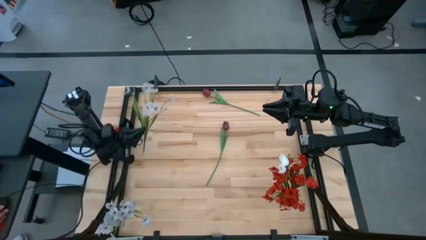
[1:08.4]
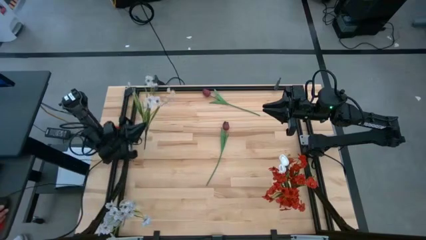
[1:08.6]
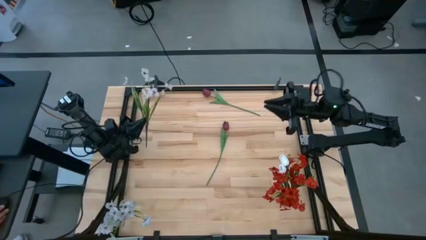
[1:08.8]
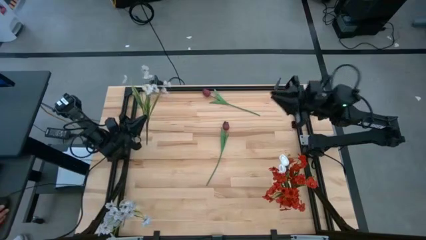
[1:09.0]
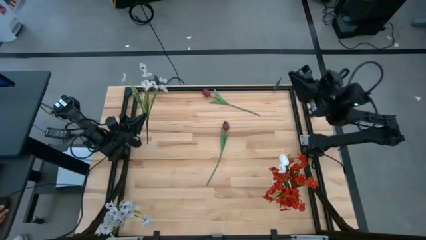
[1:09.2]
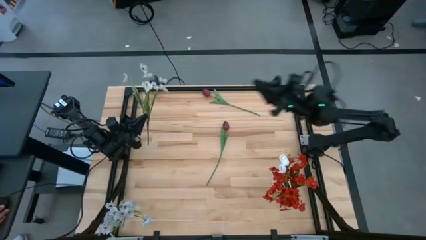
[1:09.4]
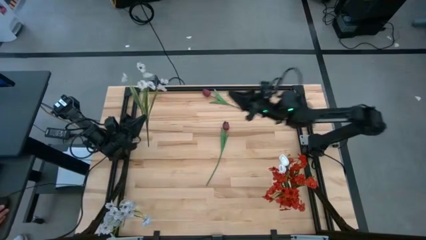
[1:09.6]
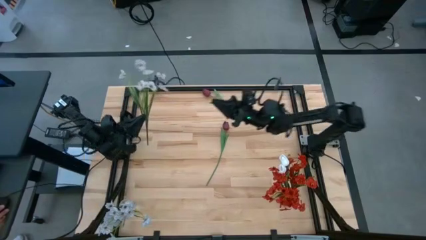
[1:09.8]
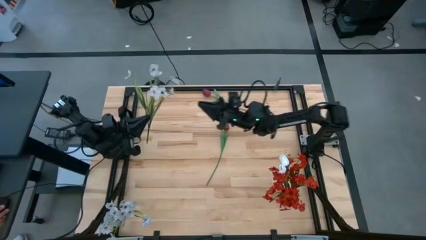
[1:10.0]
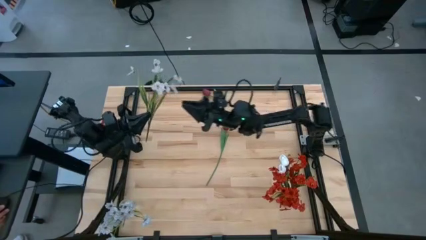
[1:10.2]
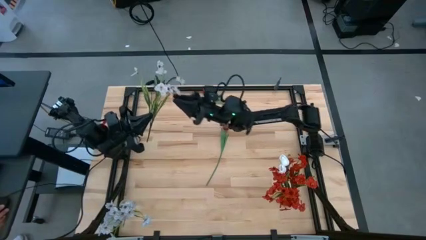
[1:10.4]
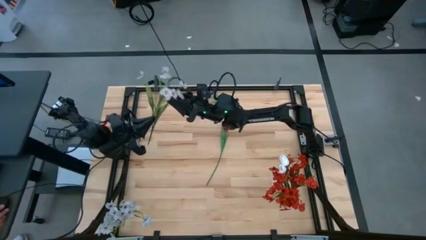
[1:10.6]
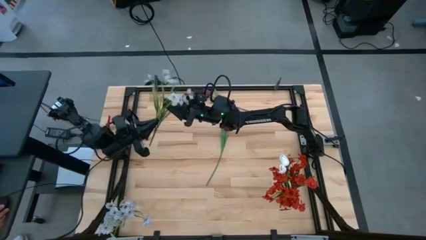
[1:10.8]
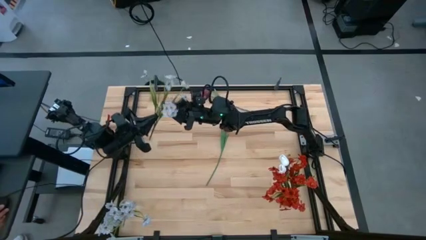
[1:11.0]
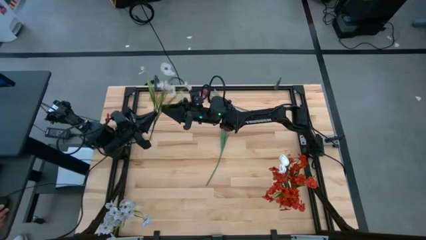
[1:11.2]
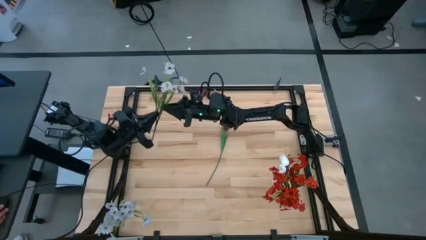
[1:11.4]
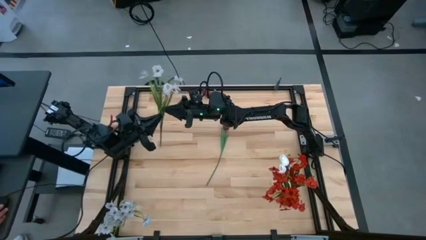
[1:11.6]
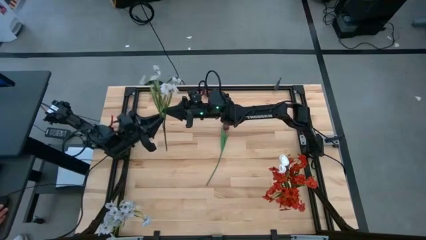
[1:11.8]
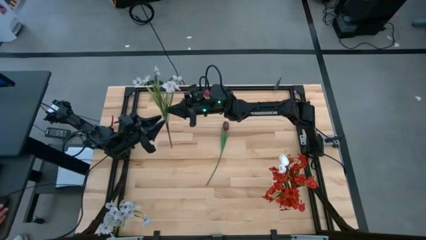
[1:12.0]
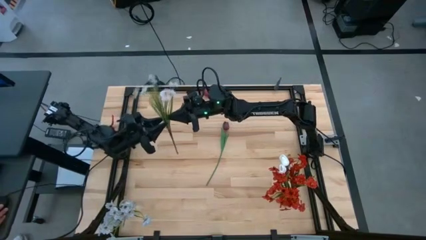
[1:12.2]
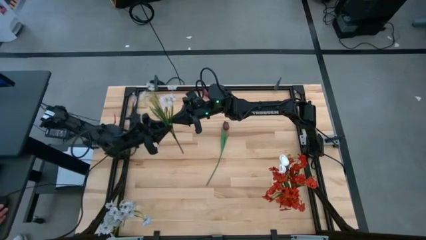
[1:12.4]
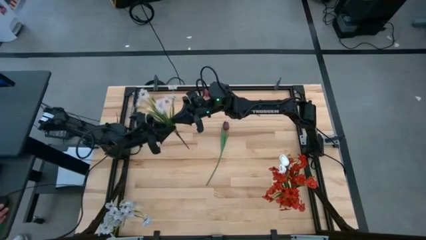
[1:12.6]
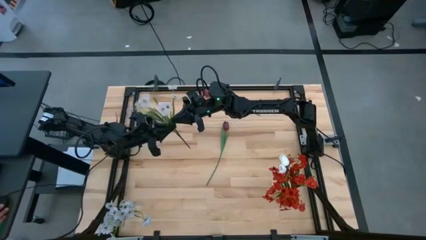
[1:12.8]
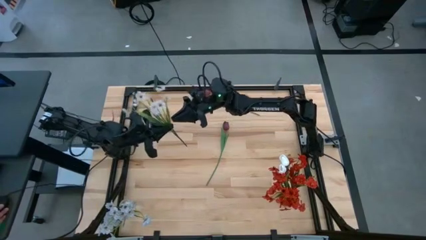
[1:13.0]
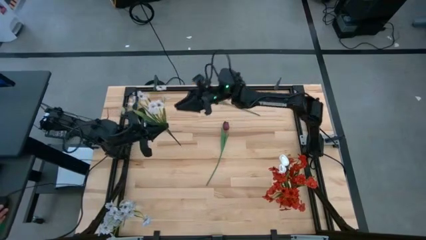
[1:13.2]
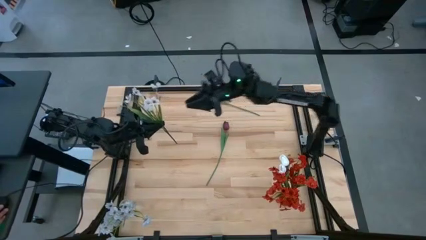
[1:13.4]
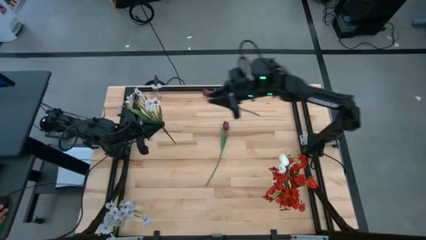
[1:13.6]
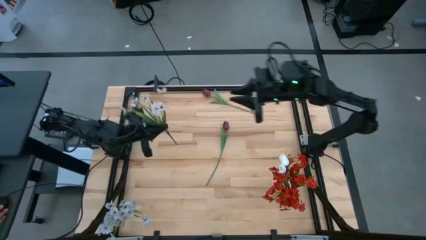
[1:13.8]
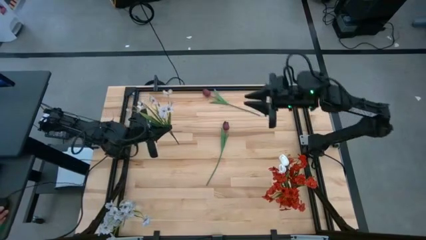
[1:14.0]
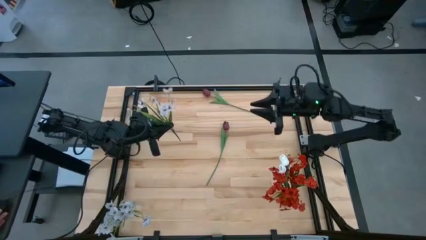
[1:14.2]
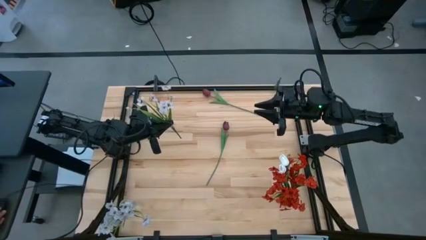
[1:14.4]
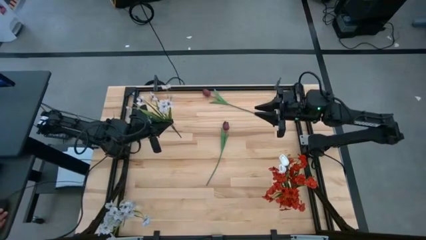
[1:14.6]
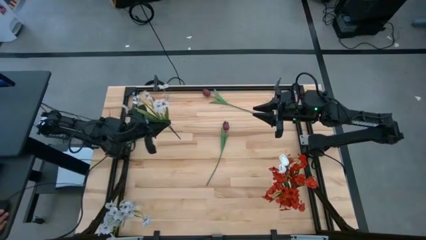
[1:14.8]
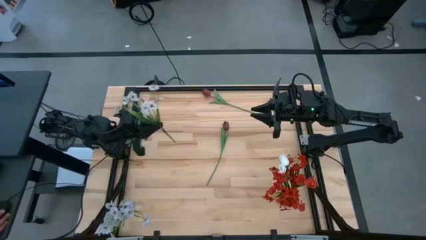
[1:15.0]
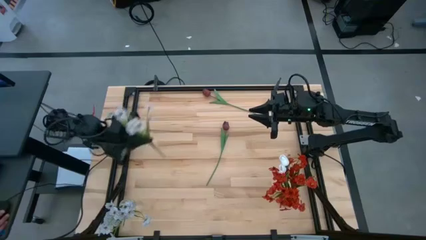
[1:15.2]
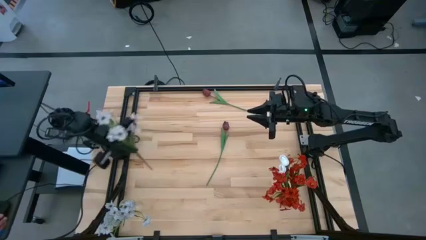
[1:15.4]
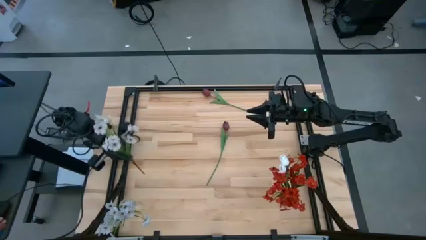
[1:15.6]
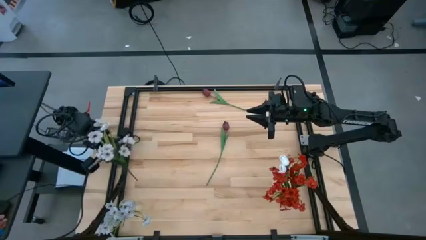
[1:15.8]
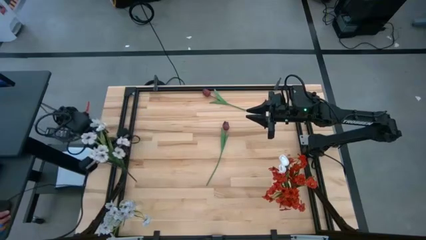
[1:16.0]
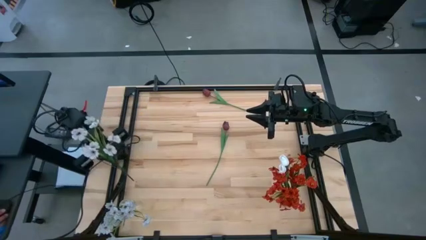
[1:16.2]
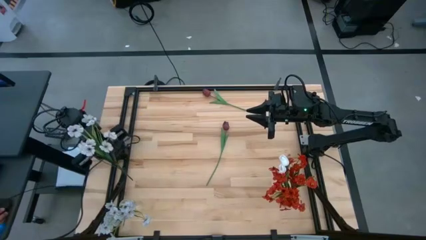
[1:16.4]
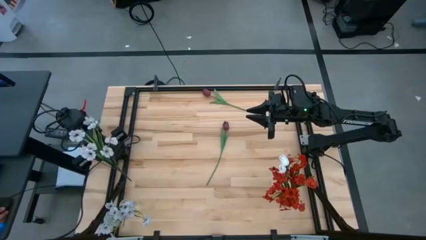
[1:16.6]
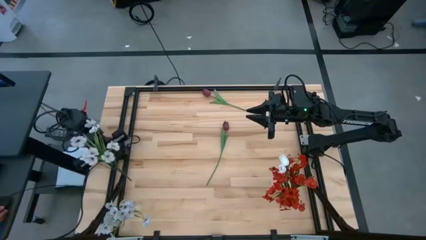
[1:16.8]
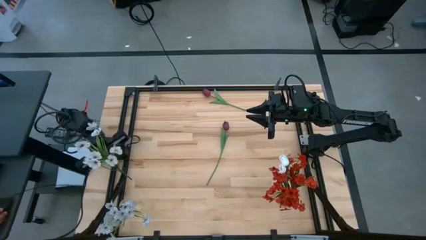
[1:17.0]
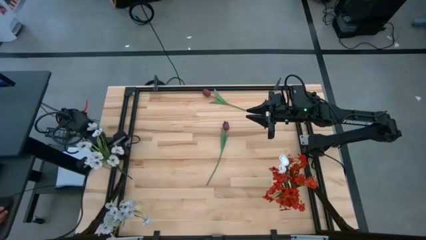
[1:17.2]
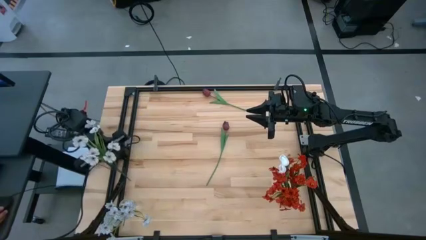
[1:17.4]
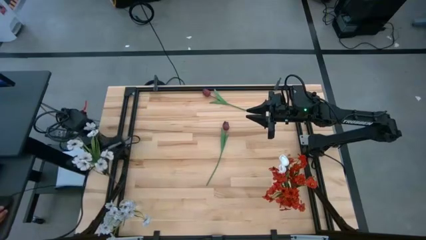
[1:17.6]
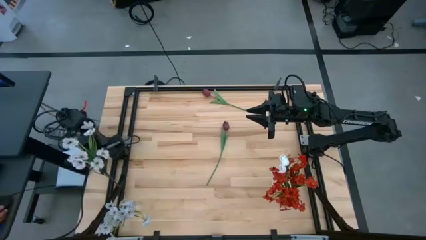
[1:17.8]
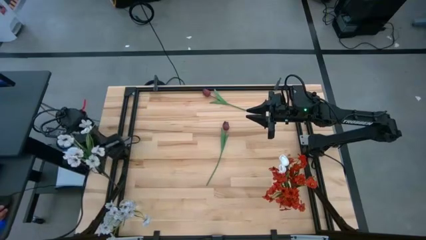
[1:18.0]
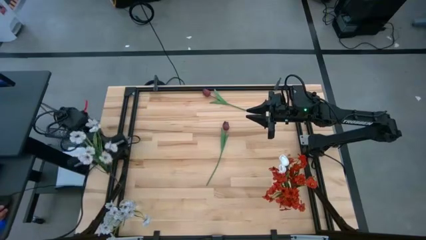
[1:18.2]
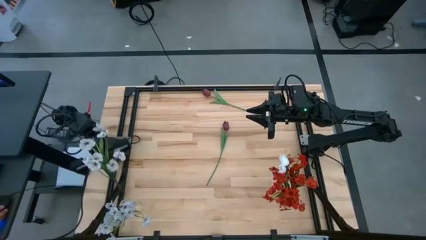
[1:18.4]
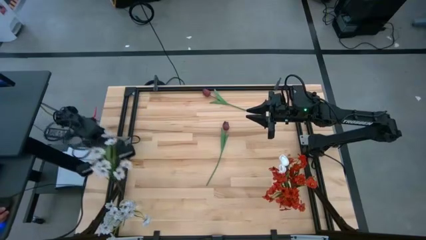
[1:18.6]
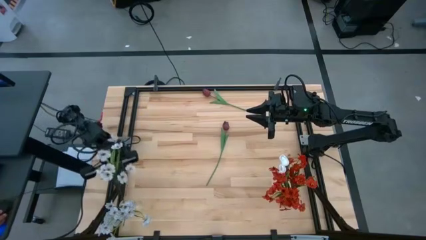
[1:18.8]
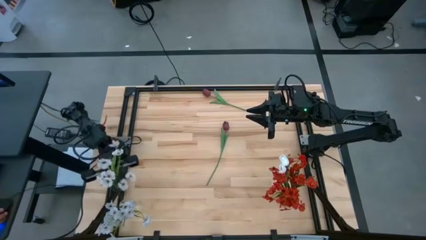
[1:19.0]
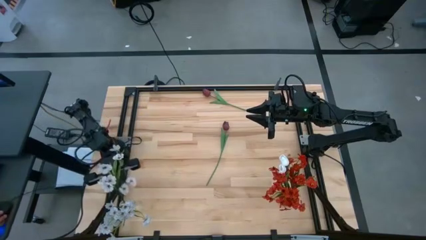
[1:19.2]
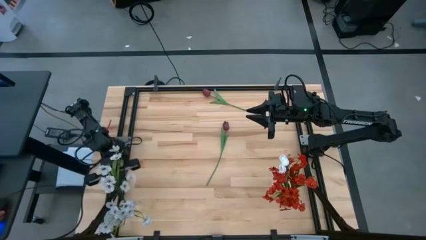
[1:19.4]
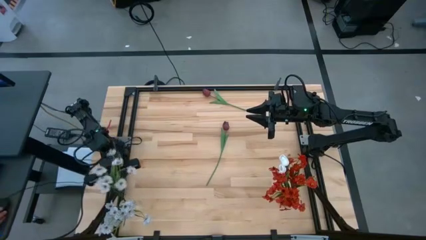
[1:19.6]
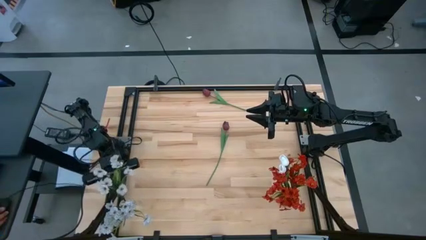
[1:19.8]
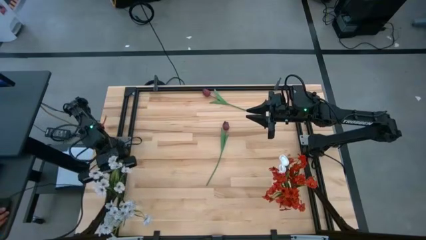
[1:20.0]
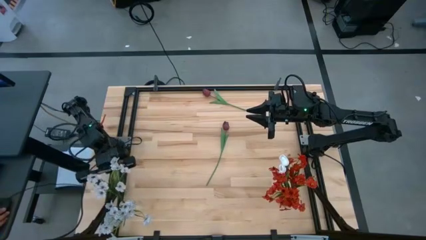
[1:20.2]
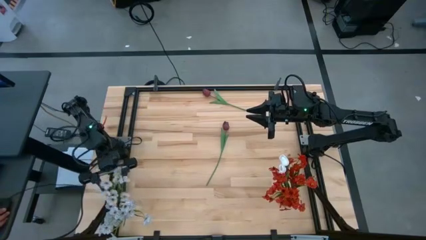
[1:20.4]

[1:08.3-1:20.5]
Task: Sort flowers into vase by color
Put the white flowers into the transparent vase

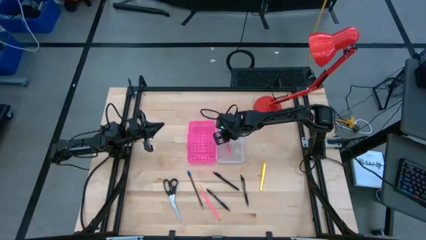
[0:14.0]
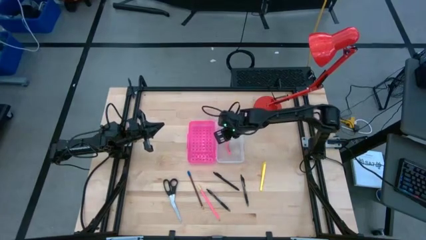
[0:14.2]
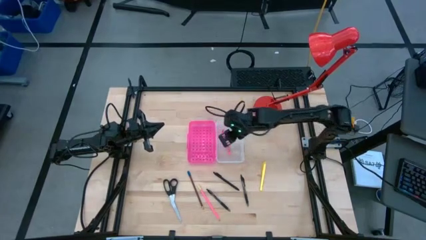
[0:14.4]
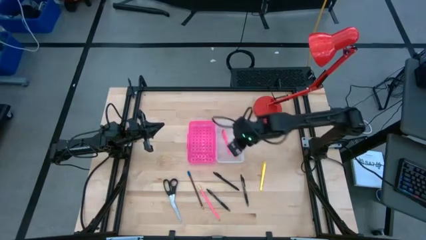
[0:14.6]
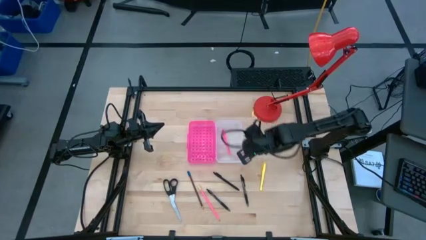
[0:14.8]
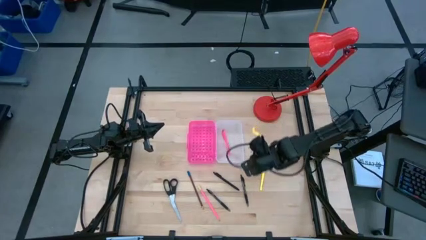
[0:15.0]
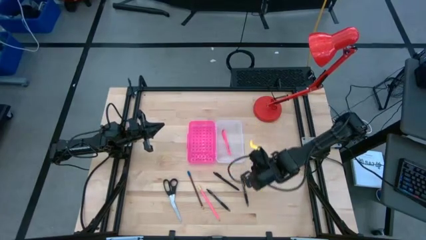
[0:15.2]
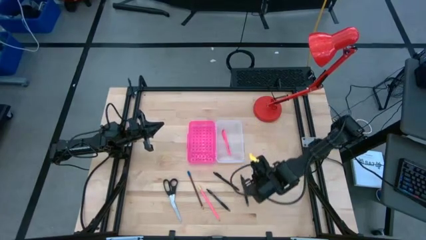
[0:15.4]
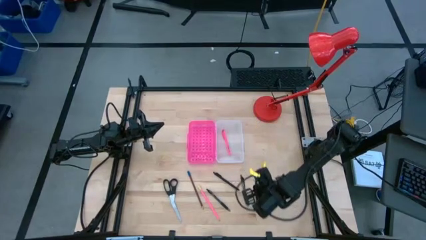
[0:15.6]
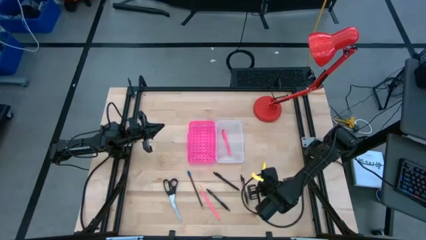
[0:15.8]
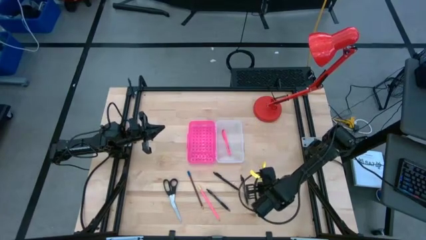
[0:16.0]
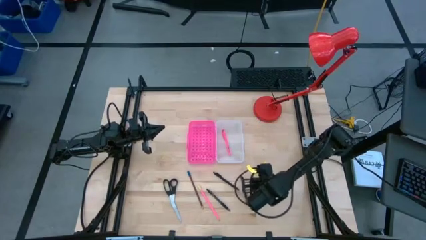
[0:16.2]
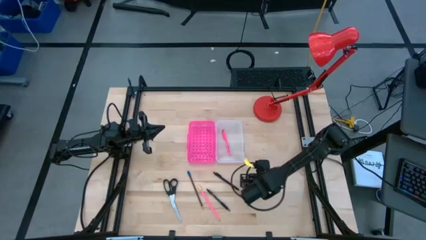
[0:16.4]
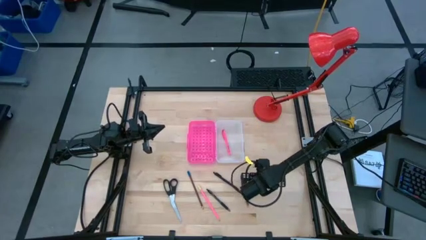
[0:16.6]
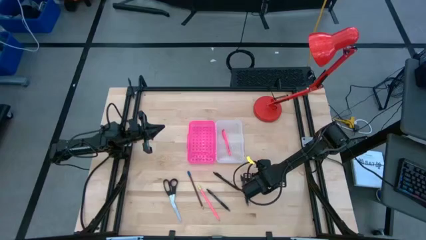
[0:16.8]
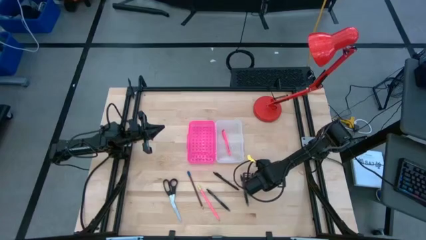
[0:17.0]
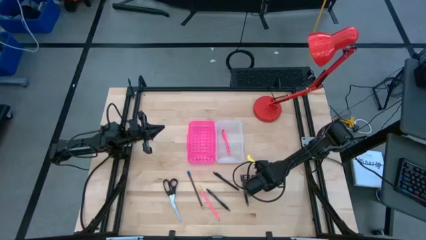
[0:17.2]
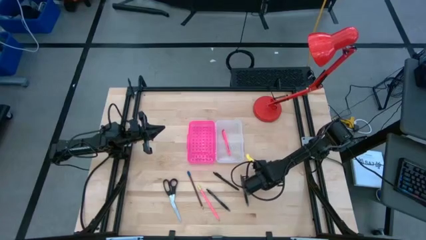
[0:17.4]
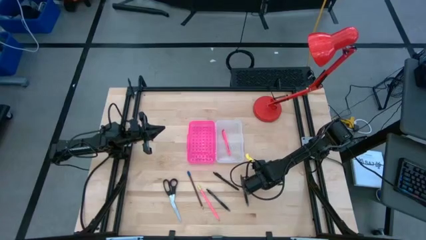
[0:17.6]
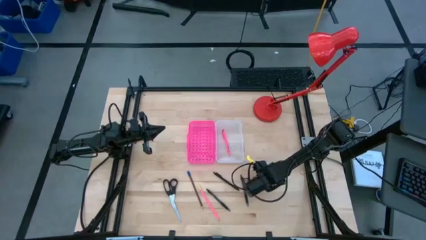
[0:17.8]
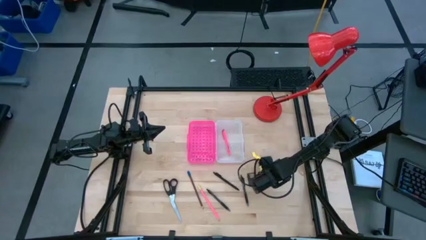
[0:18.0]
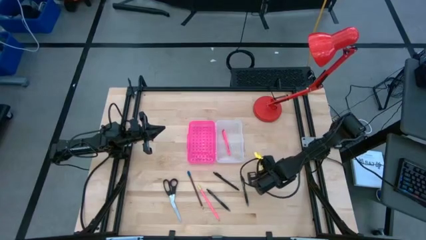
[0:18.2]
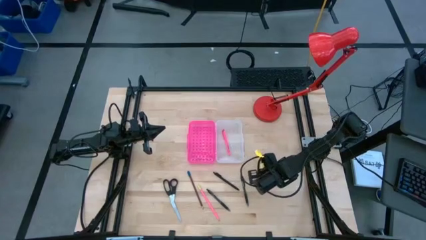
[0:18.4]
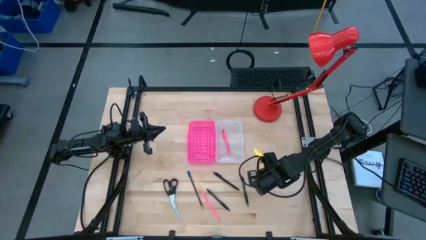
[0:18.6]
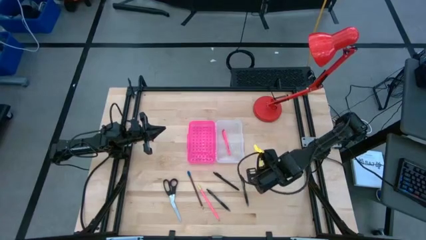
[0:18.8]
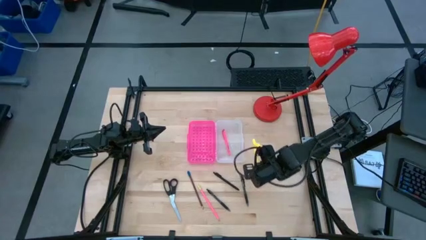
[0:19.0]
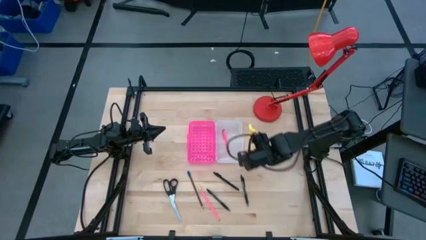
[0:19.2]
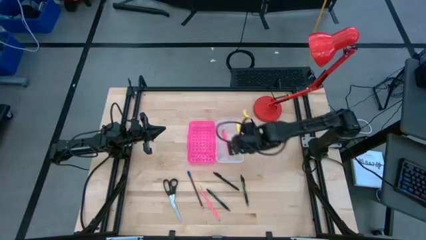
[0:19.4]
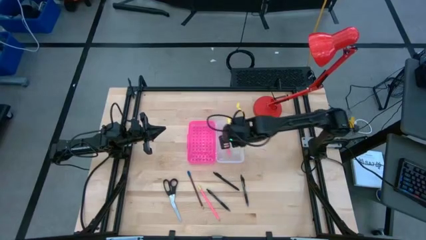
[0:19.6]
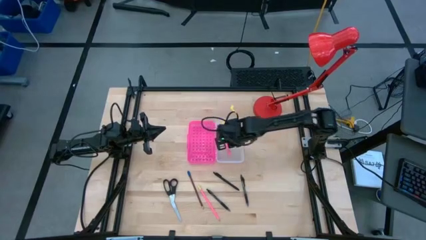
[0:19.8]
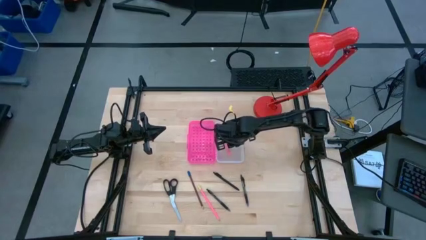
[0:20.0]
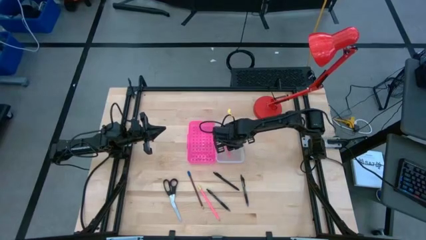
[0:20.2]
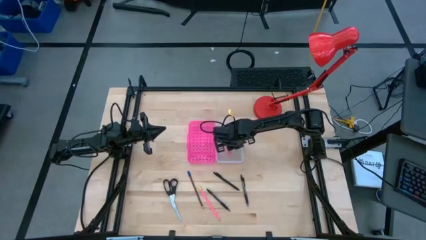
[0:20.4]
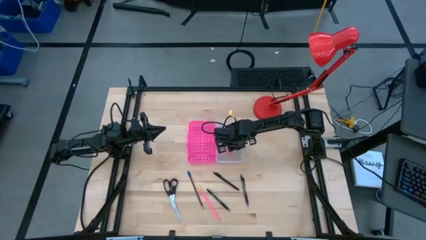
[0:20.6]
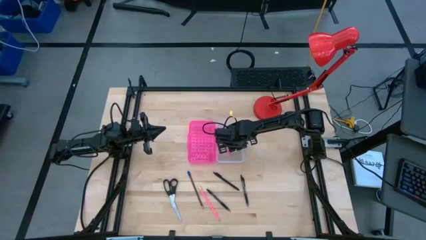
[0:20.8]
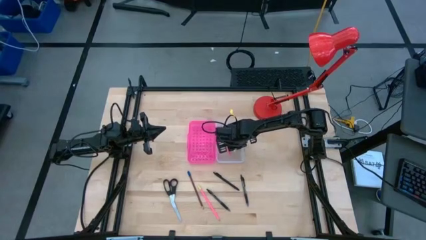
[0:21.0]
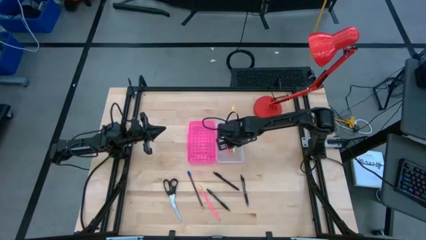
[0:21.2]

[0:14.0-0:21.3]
Task: Pick & place school supplies into a supply box
Put the yellow pen into the supply box
